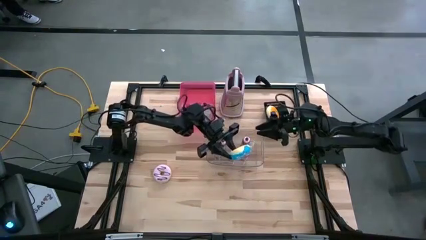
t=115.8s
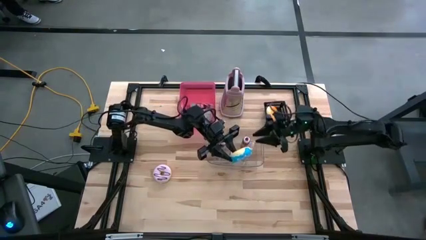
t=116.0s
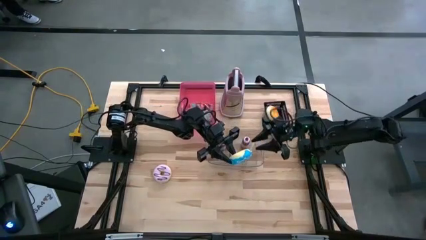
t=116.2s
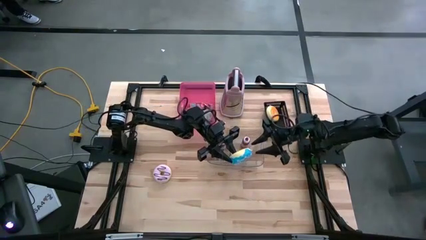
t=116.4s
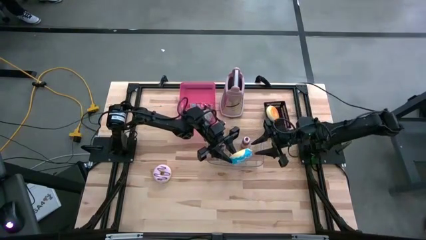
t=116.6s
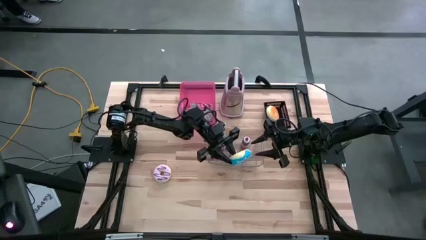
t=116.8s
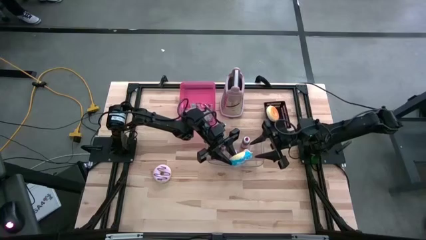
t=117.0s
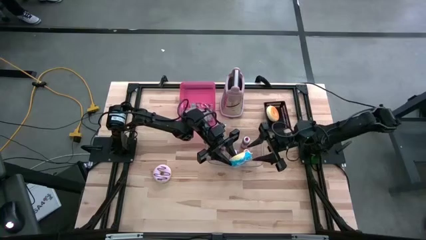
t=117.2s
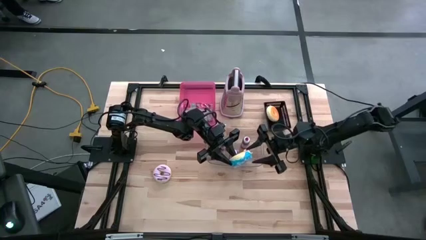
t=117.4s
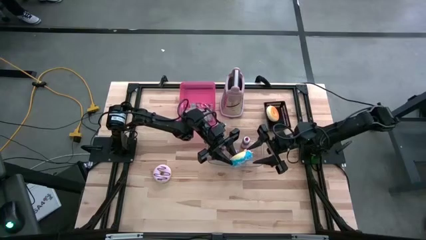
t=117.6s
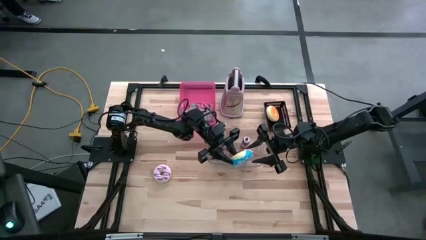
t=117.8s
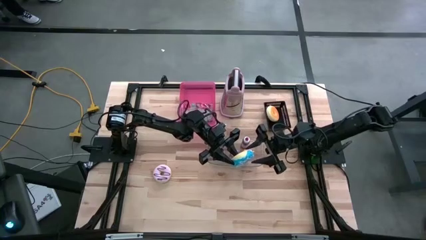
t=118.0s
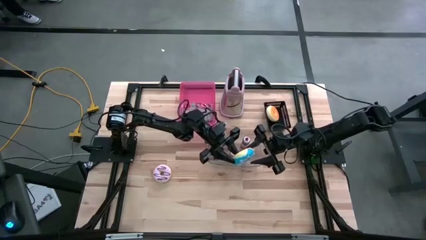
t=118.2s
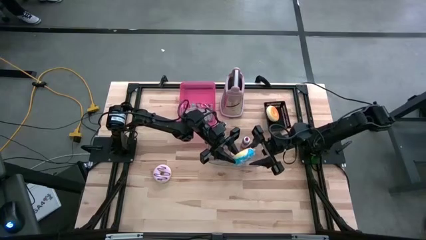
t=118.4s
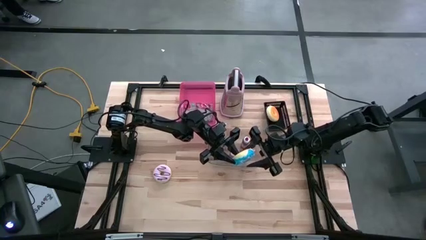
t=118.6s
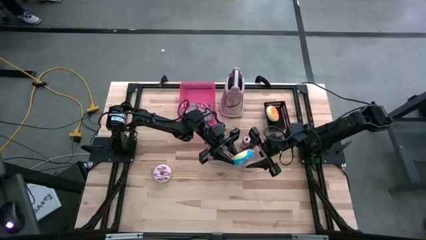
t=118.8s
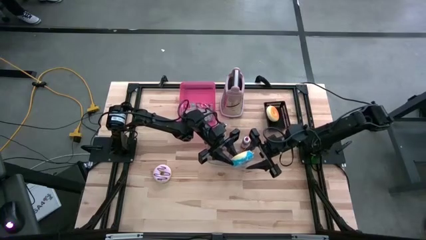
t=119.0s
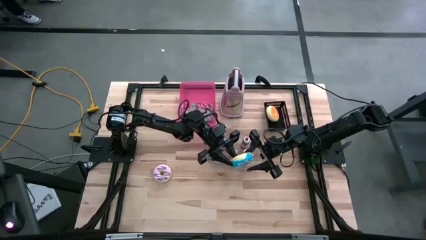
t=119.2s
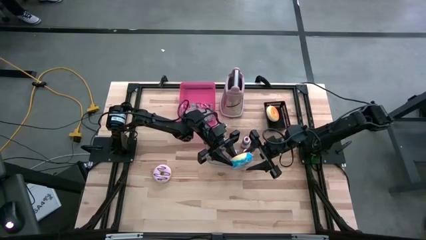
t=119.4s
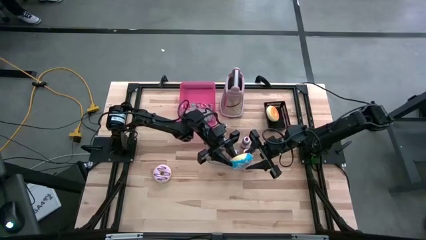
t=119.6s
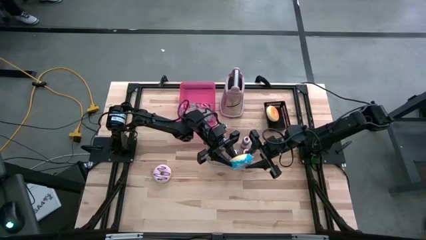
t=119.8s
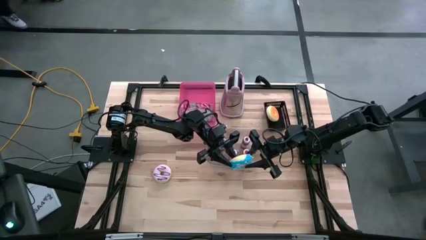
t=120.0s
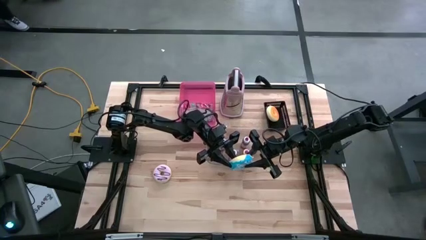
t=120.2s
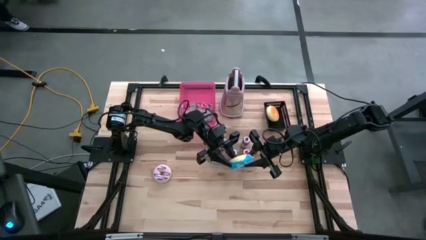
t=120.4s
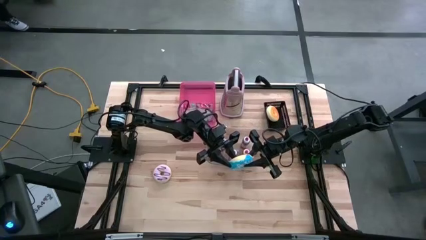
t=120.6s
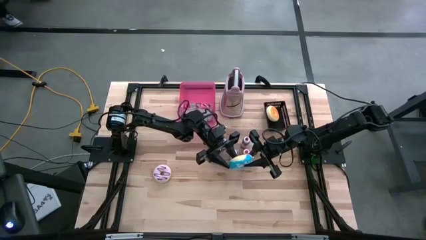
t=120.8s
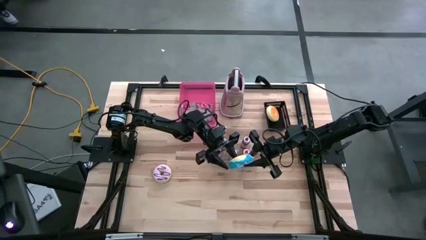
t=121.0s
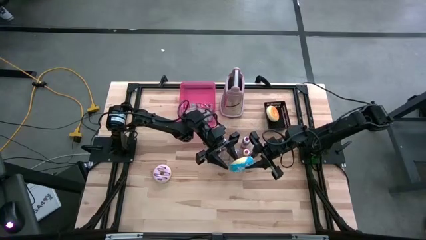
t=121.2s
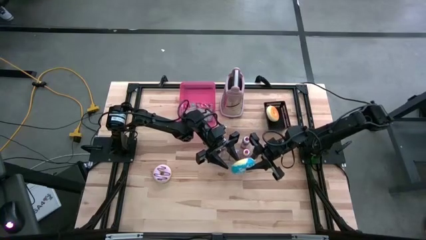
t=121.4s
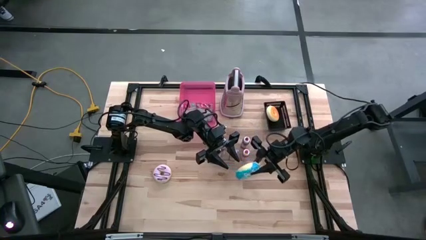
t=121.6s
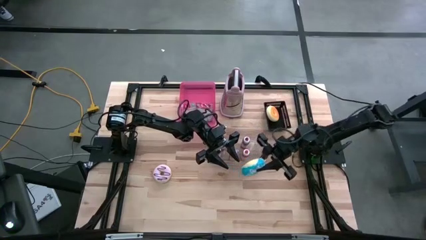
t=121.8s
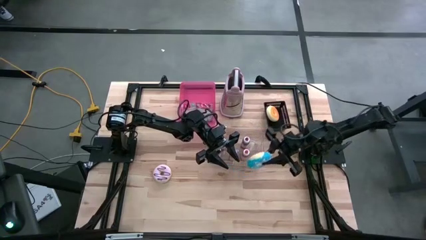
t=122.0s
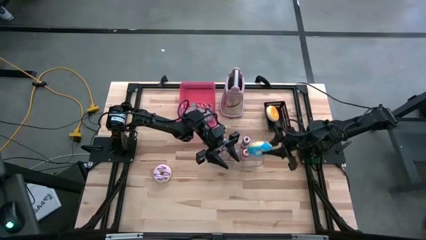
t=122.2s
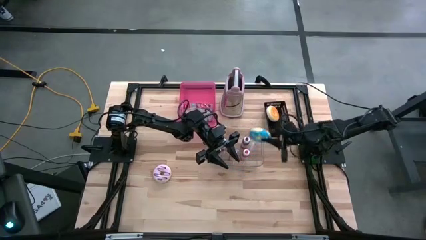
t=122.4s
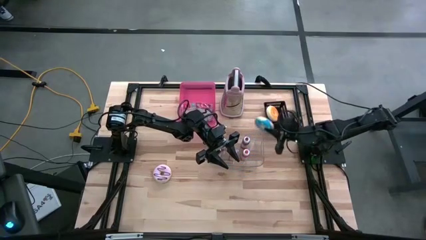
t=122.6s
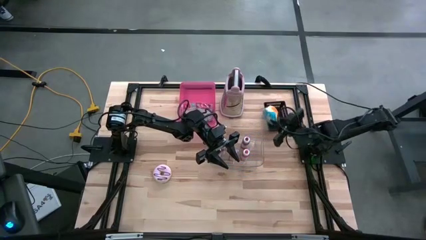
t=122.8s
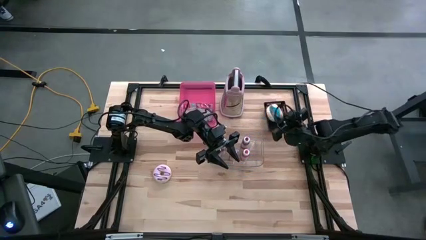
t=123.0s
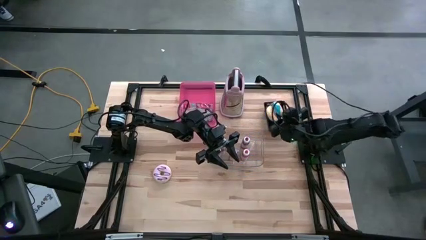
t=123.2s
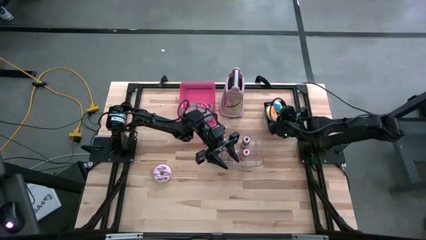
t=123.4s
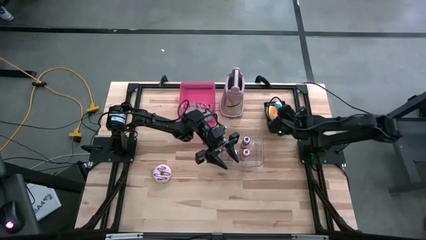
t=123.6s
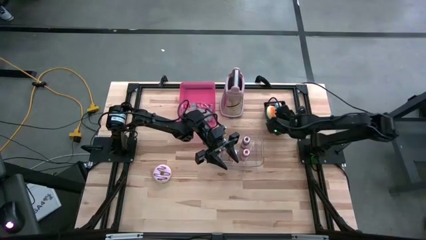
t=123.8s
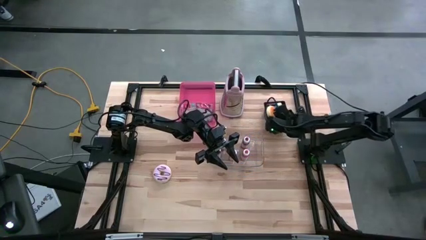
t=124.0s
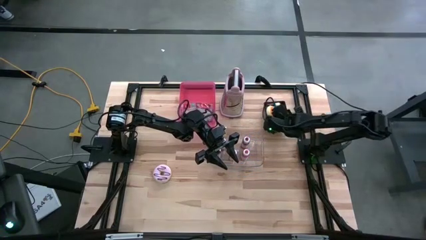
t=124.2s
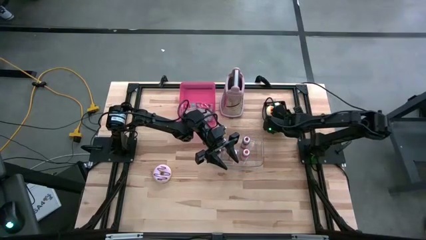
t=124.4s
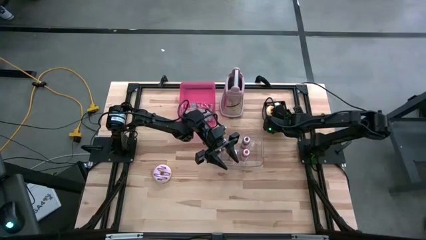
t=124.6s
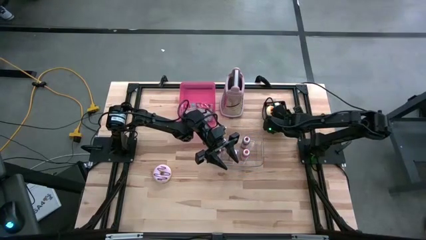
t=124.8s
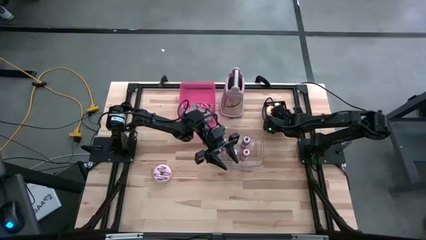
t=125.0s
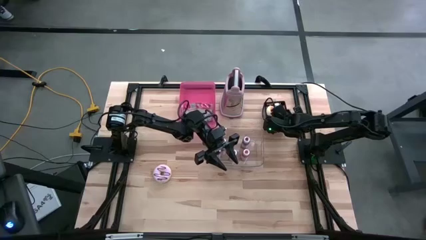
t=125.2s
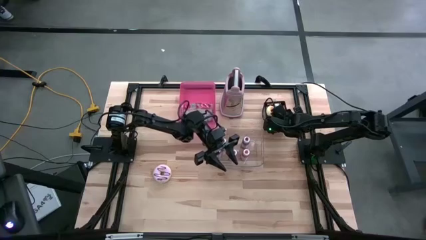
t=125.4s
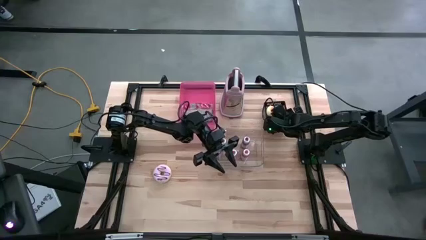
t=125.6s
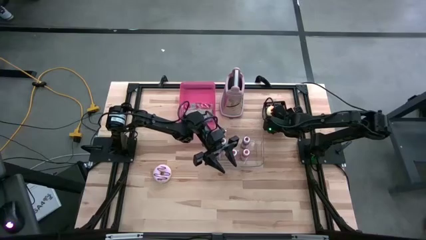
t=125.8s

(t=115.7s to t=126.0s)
Put the blue donut into the black bin
